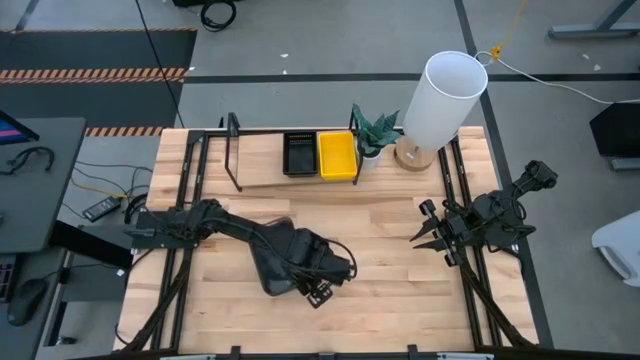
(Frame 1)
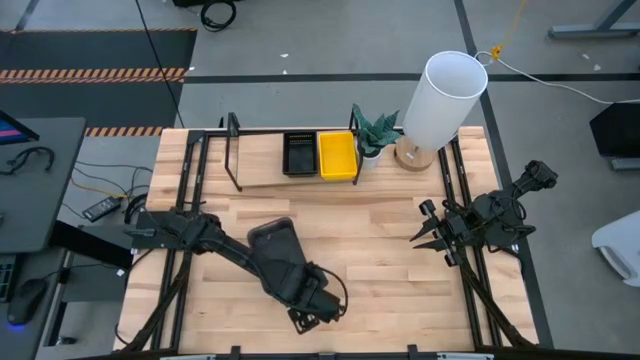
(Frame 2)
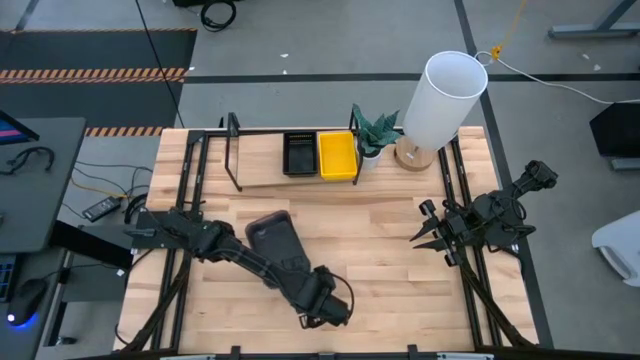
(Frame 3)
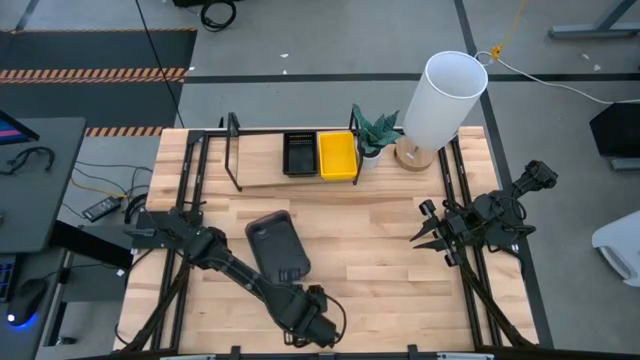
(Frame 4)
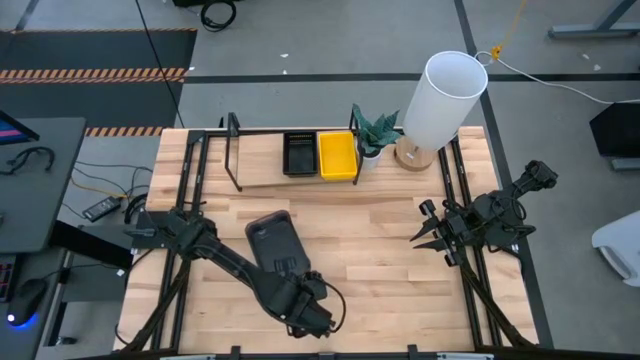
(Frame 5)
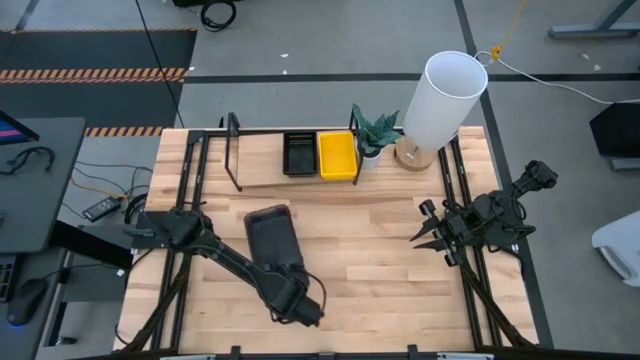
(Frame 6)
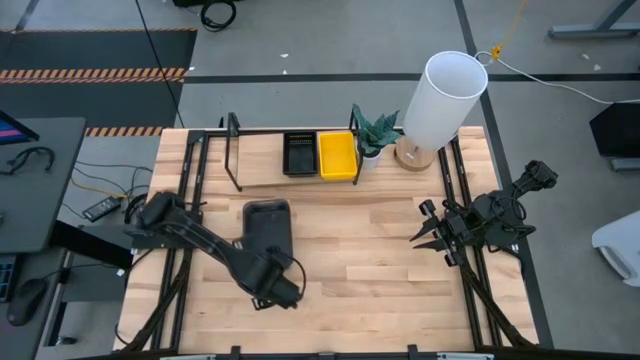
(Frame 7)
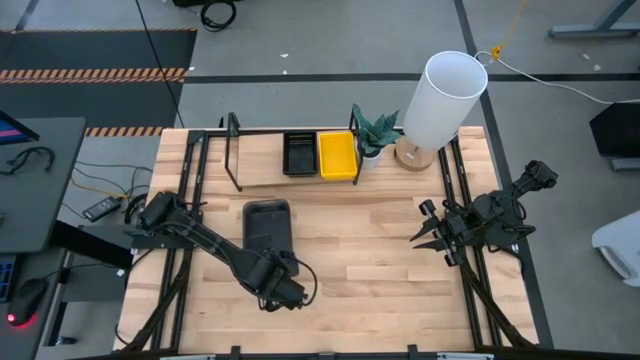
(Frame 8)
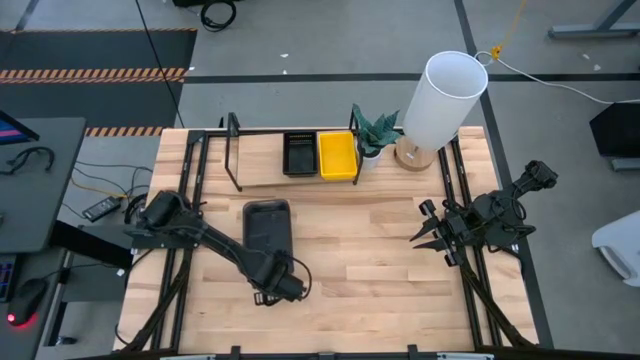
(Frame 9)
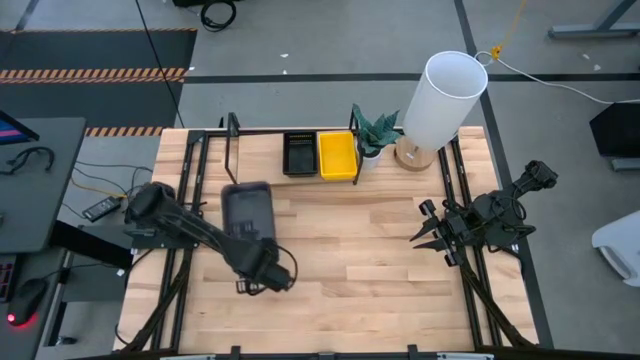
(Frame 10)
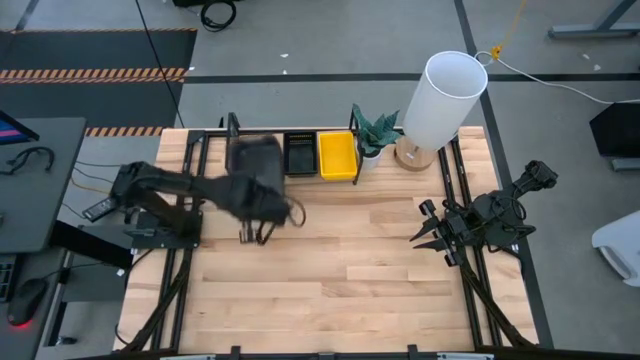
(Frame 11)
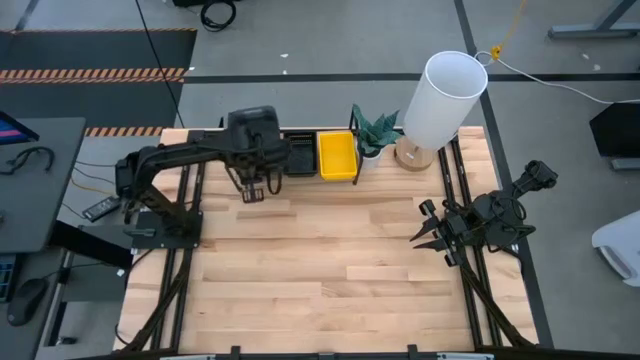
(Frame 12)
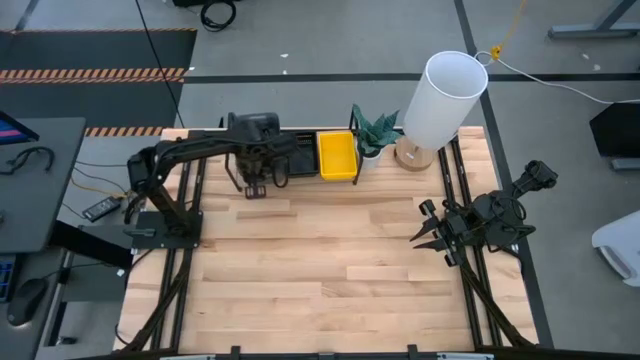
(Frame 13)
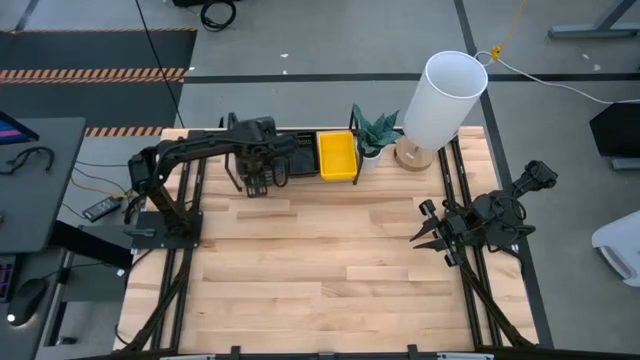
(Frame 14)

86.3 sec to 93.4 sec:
Task: Stack baskets on shelf by color
Put the stacked black bins on the shelf

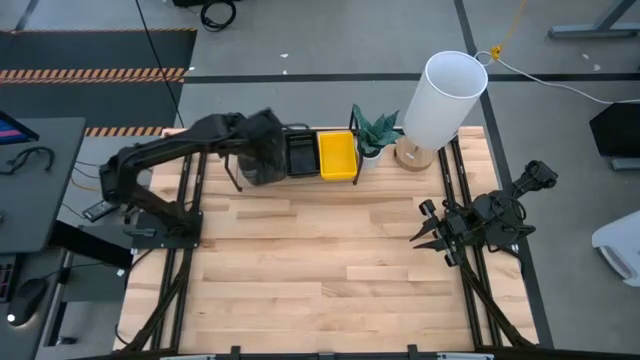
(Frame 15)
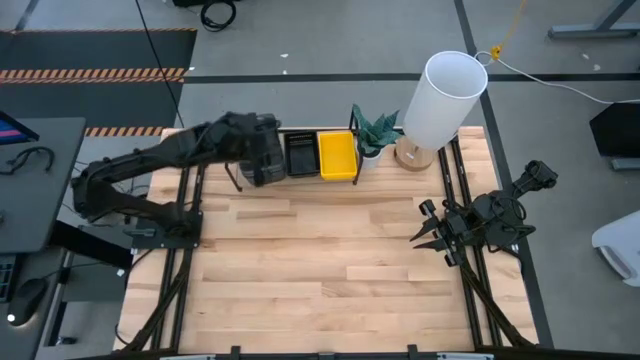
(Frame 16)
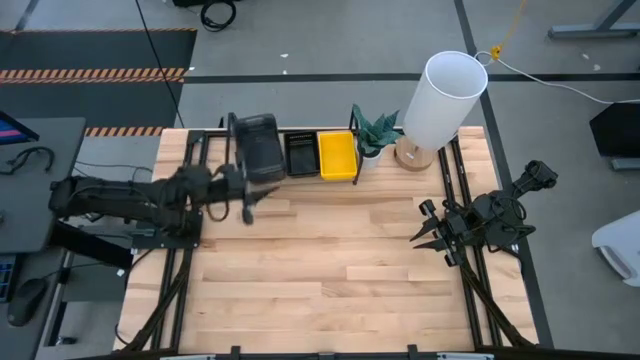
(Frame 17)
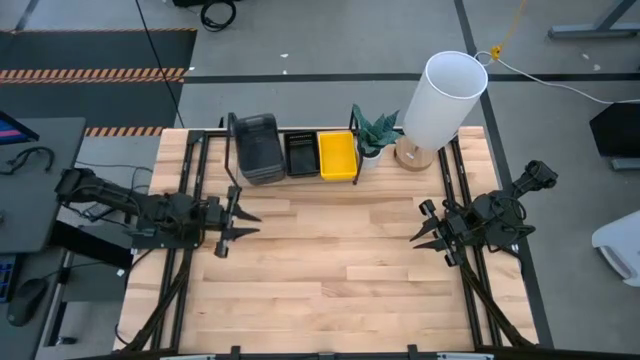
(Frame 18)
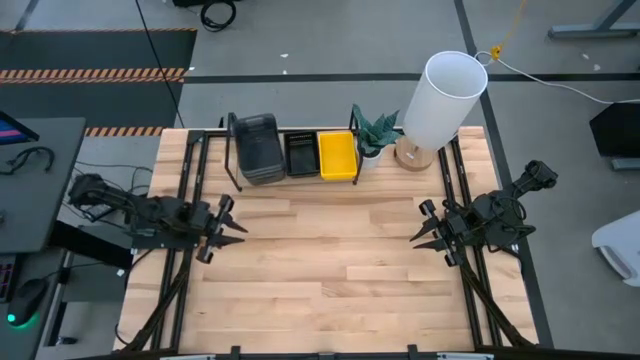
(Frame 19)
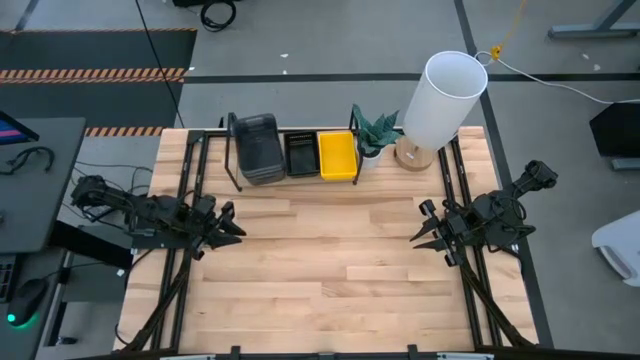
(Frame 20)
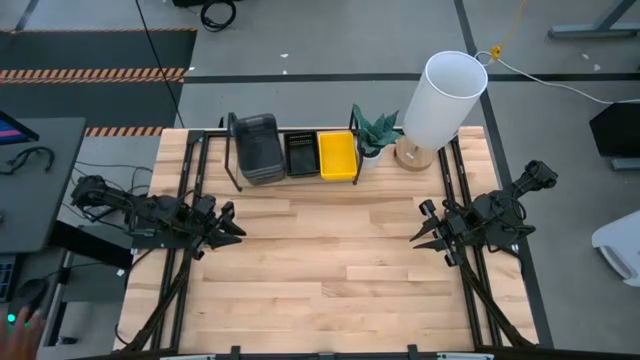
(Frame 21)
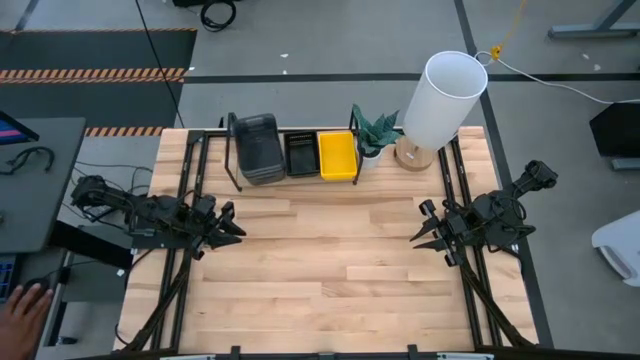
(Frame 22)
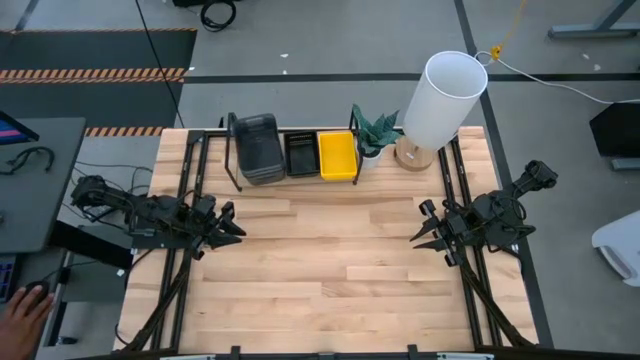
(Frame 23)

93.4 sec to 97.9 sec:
Return to Home Position

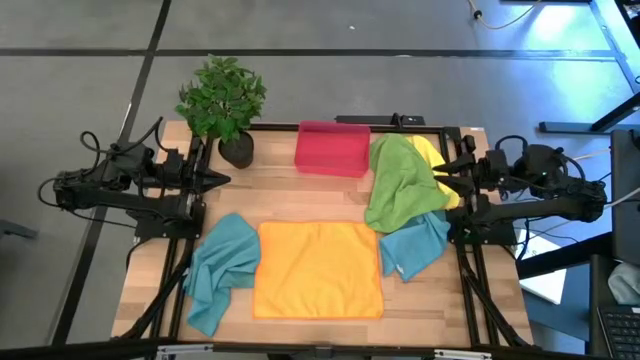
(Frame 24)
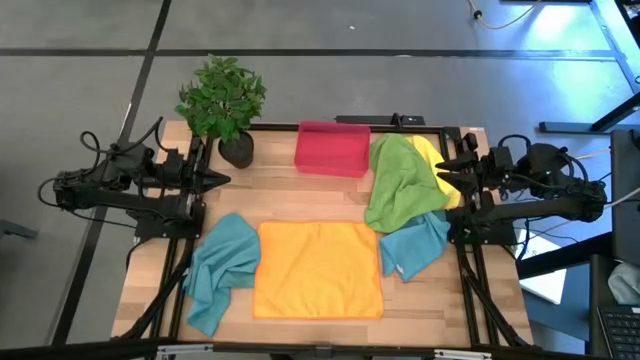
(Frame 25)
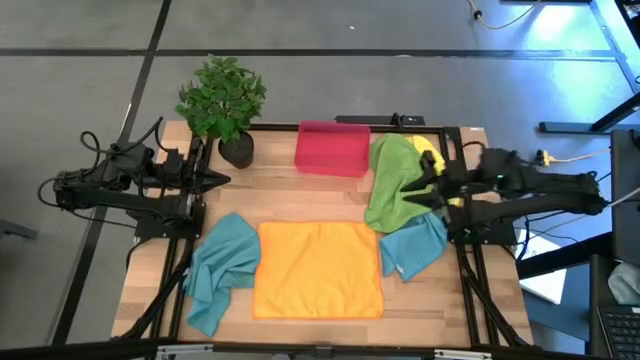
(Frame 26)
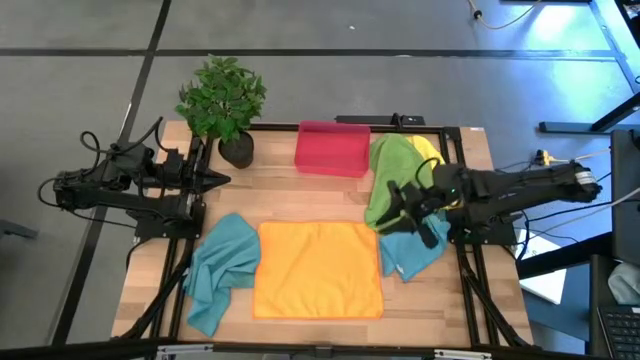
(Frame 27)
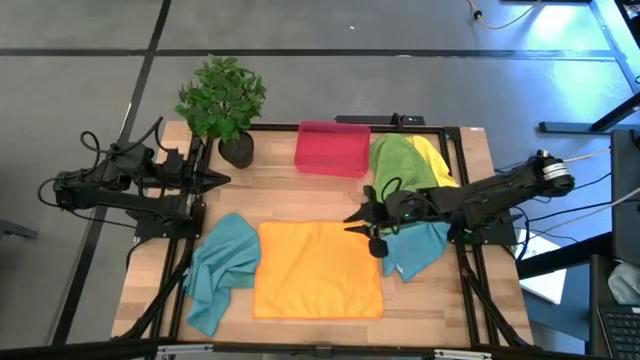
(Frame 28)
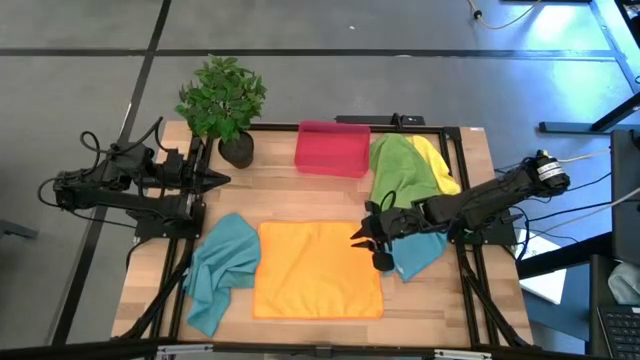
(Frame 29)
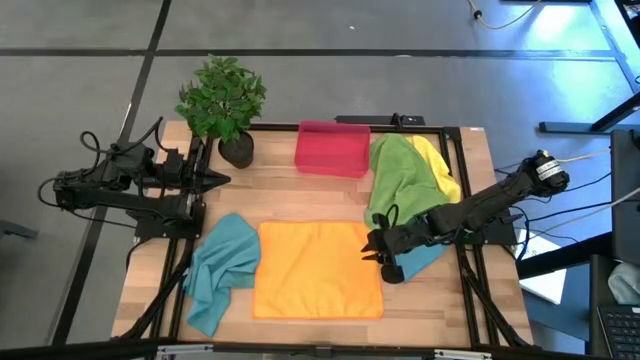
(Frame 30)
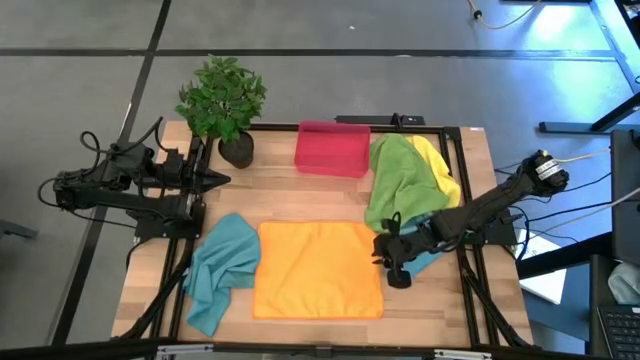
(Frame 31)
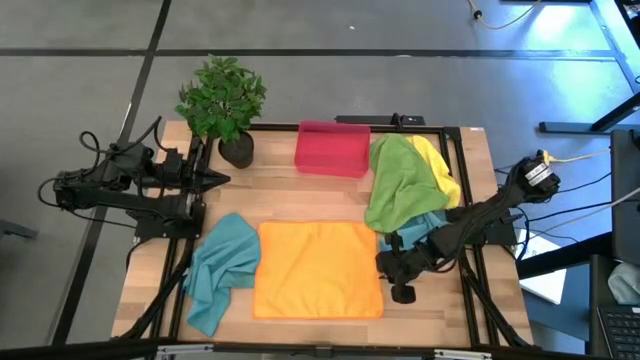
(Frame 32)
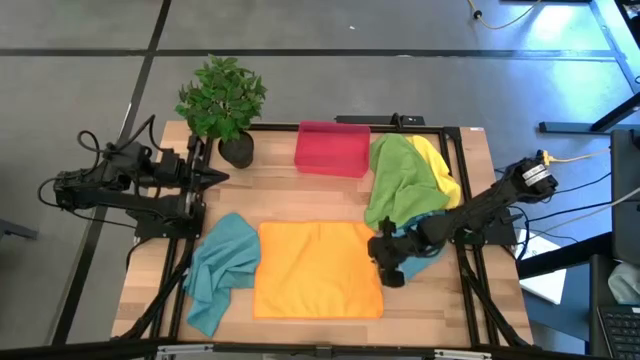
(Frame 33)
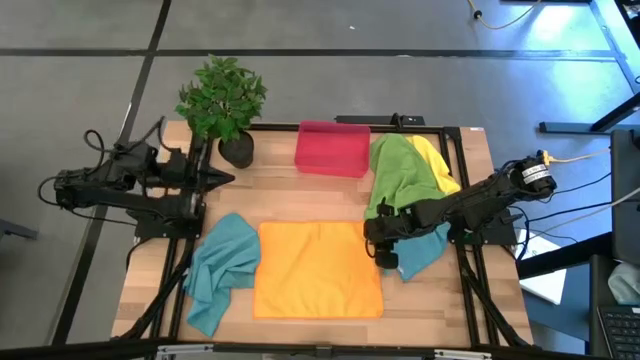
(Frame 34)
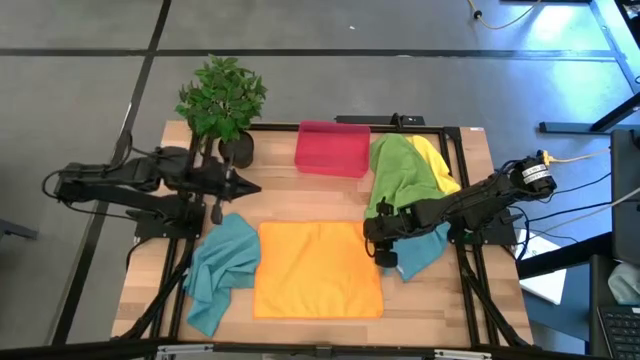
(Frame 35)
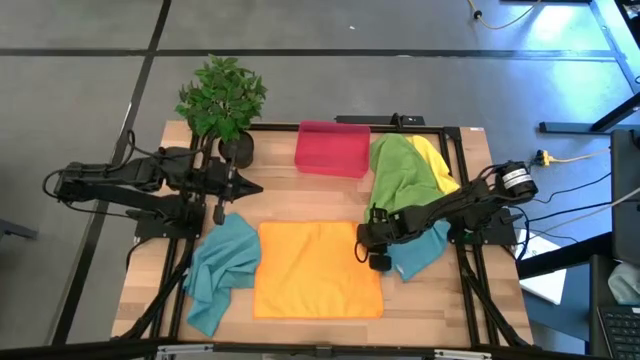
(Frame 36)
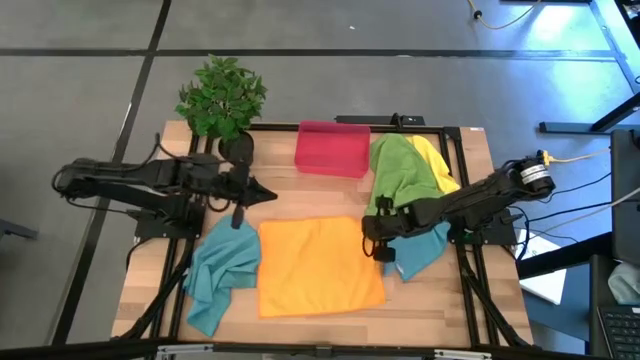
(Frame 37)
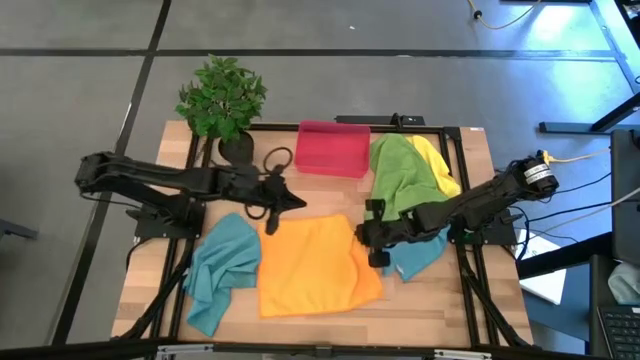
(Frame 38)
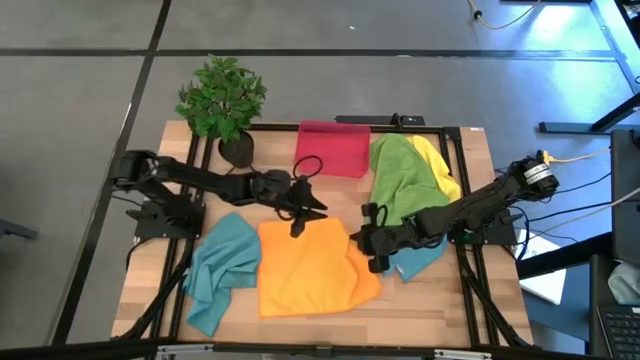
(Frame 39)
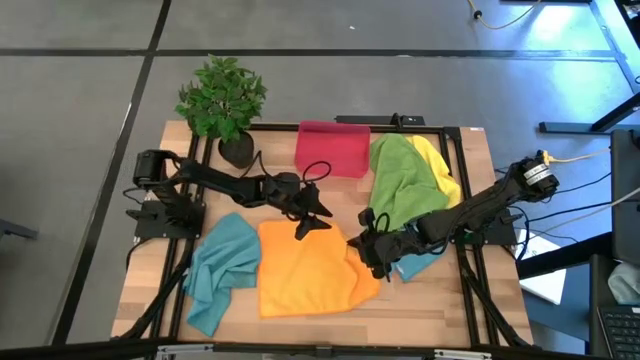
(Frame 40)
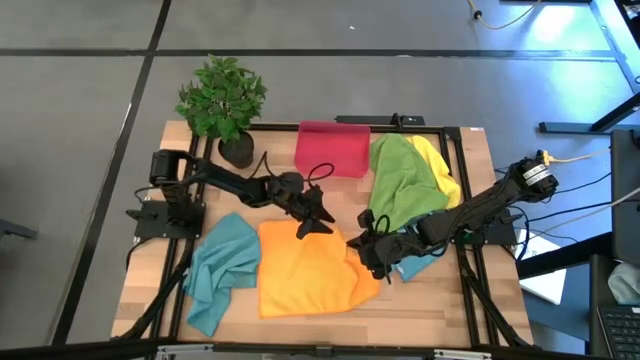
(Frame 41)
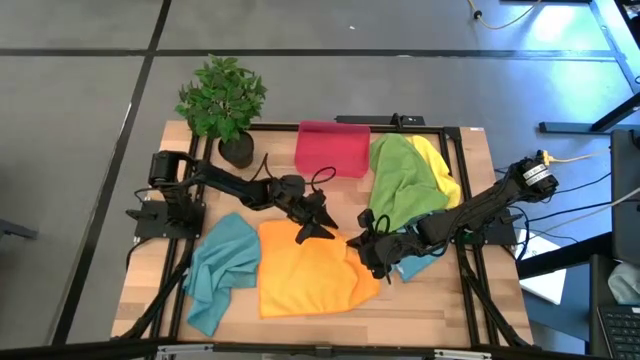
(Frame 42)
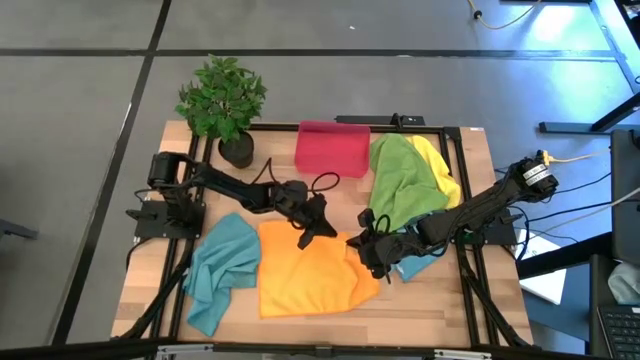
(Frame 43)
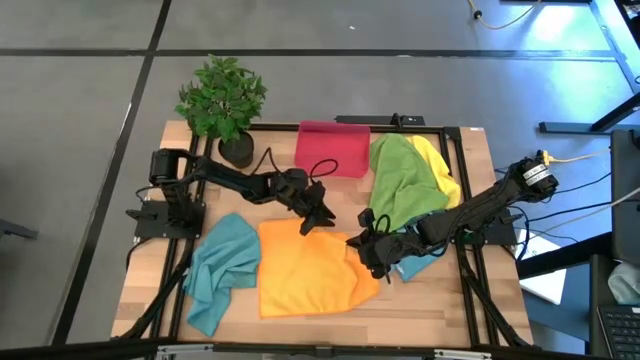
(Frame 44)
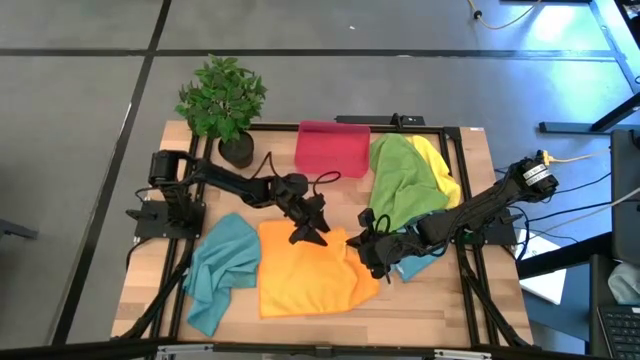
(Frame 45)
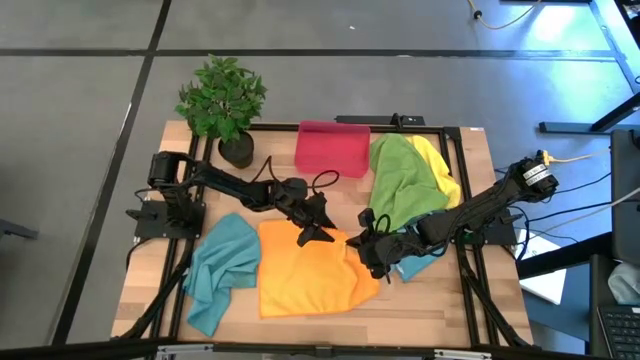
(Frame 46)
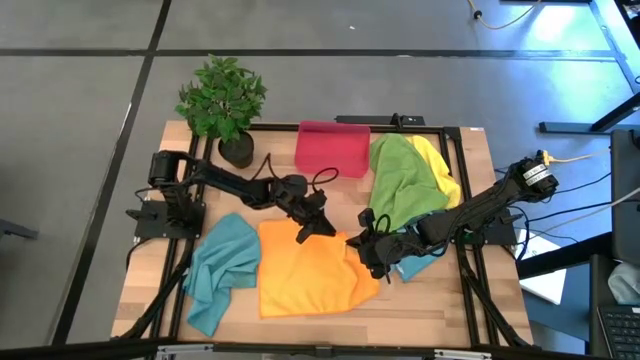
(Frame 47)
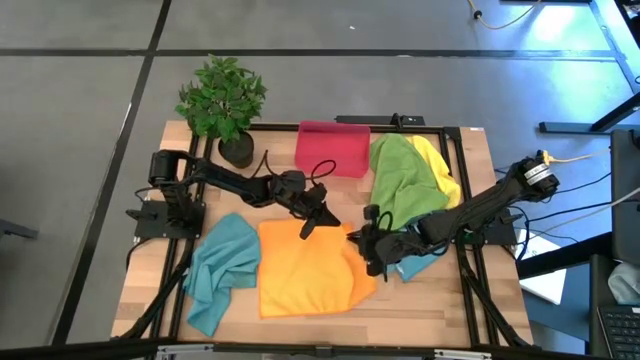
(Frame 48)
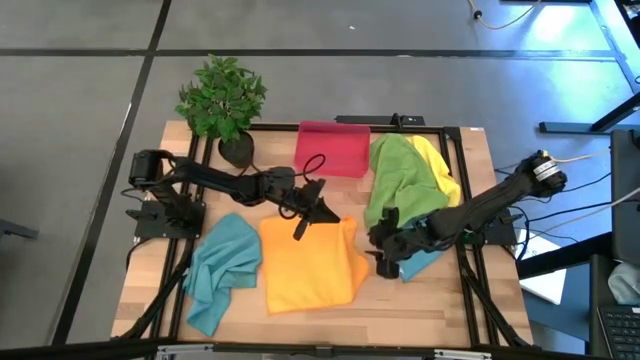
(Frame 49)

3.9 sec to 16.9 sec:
Task: Roll microfiber towels into tight, uniform cylinder then place into a basket
Fold the orange towel
